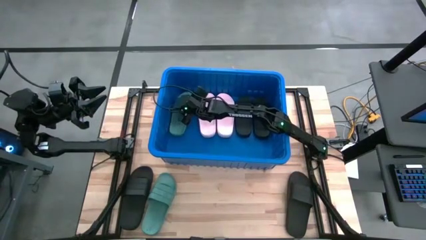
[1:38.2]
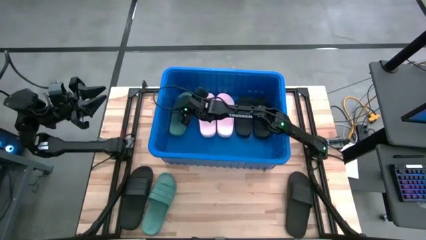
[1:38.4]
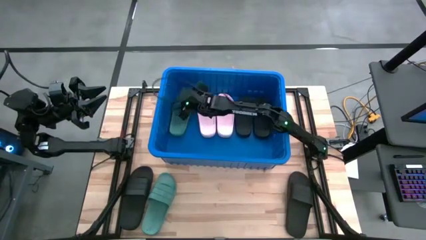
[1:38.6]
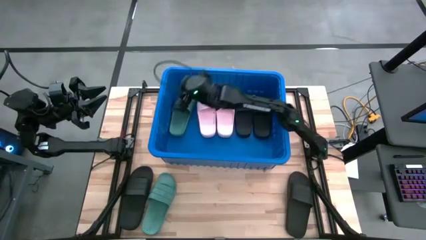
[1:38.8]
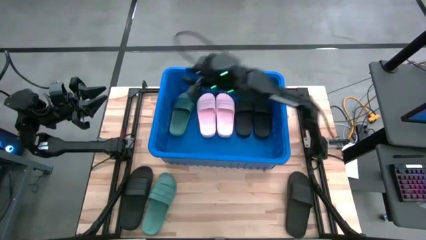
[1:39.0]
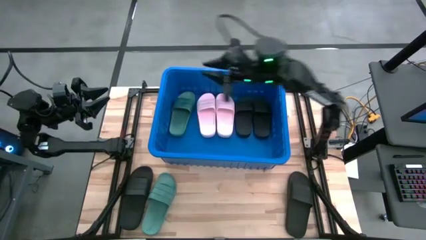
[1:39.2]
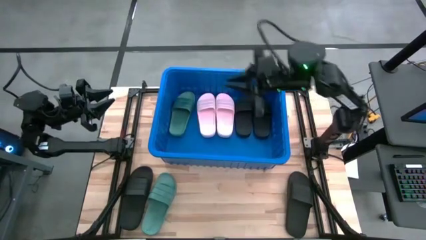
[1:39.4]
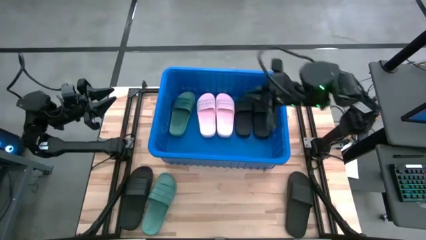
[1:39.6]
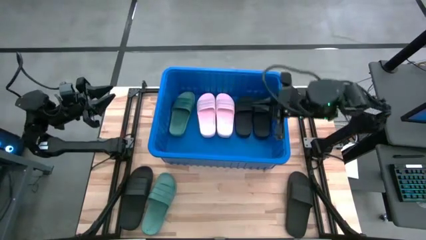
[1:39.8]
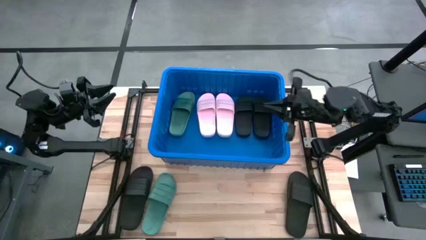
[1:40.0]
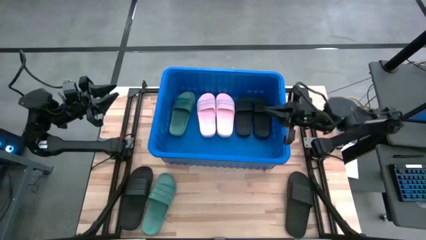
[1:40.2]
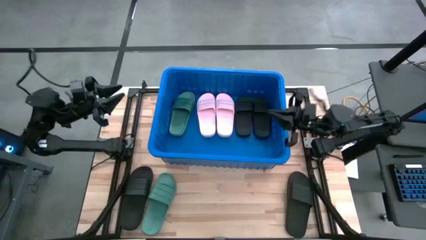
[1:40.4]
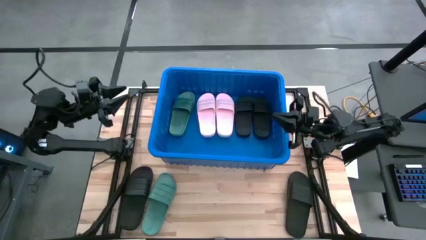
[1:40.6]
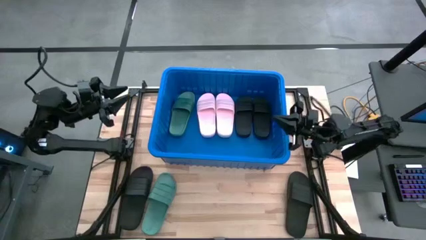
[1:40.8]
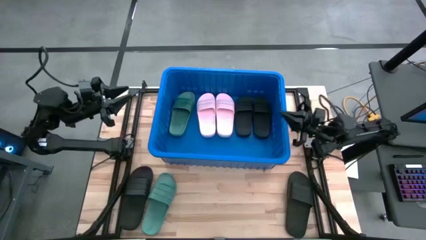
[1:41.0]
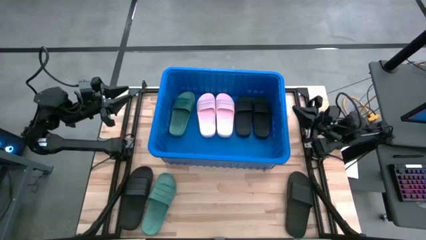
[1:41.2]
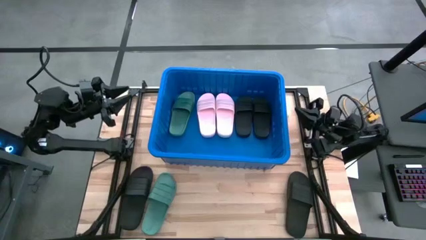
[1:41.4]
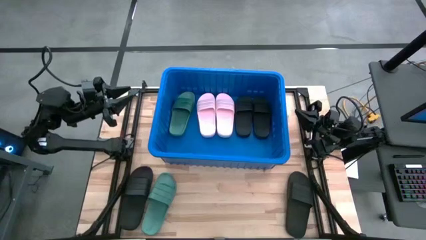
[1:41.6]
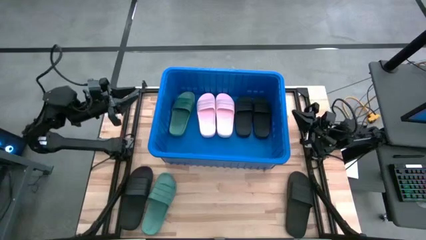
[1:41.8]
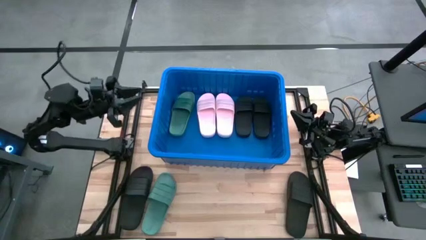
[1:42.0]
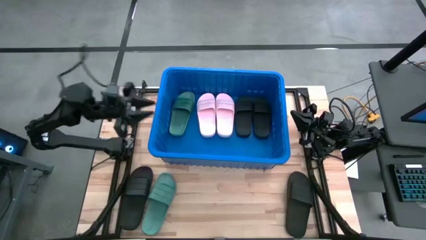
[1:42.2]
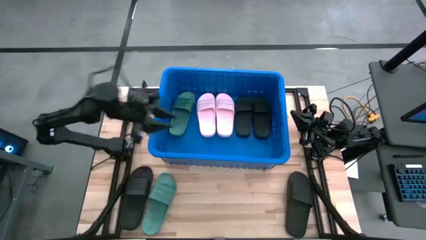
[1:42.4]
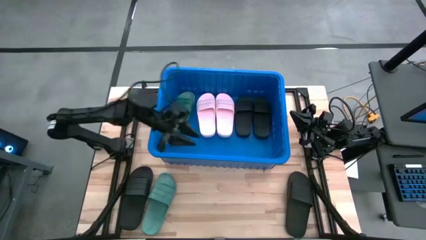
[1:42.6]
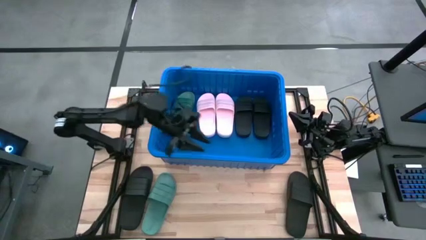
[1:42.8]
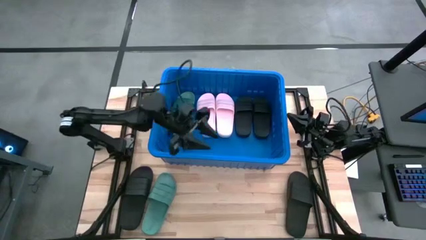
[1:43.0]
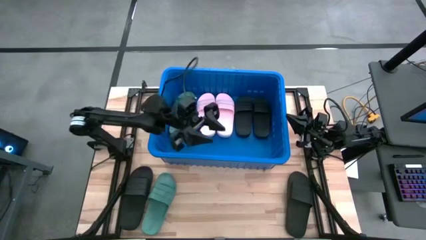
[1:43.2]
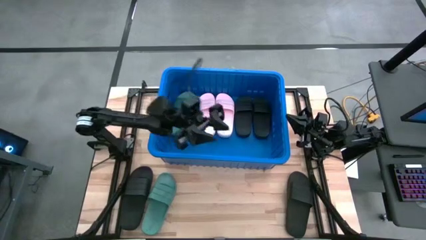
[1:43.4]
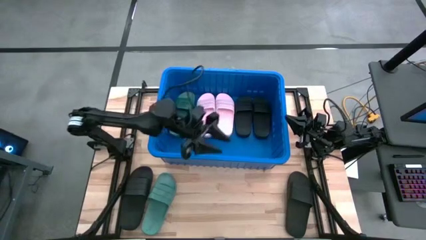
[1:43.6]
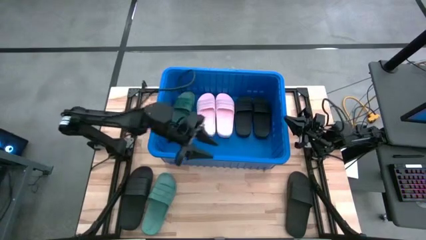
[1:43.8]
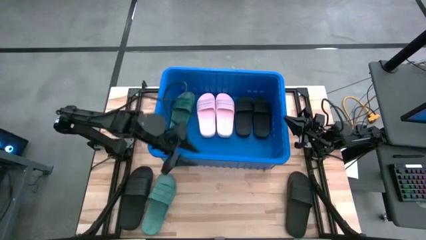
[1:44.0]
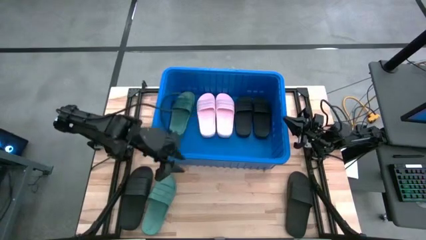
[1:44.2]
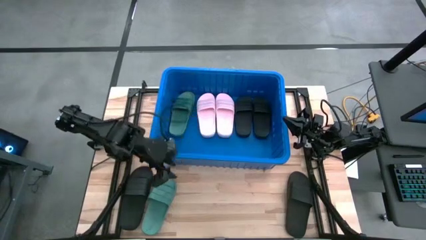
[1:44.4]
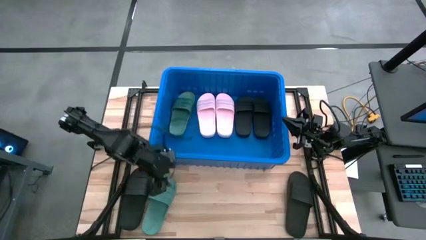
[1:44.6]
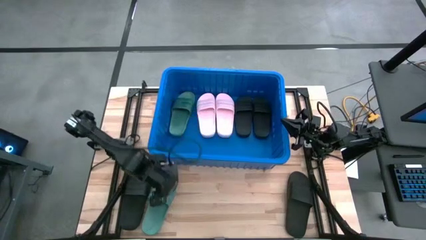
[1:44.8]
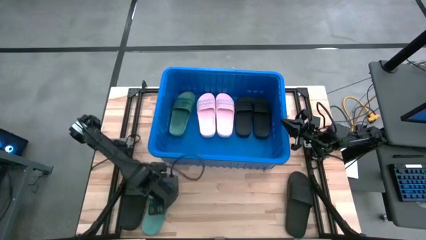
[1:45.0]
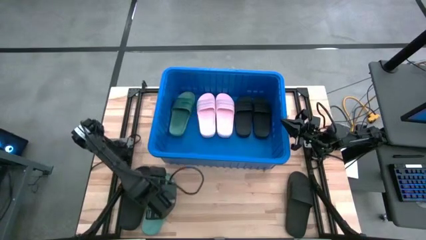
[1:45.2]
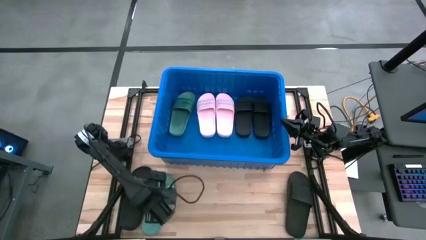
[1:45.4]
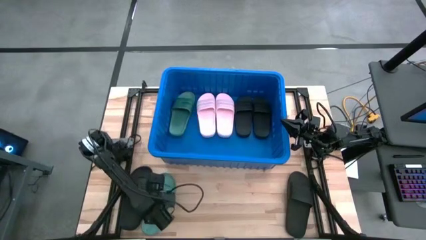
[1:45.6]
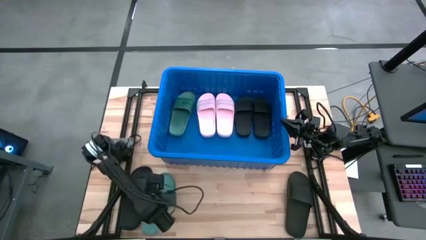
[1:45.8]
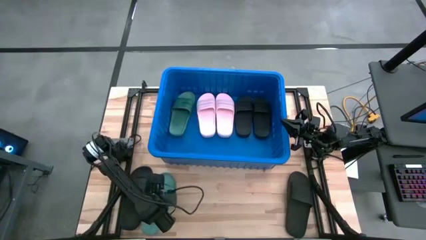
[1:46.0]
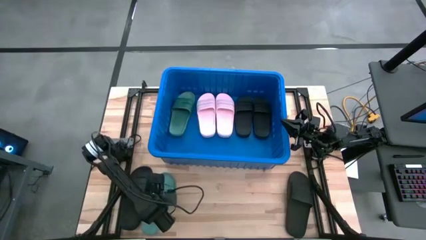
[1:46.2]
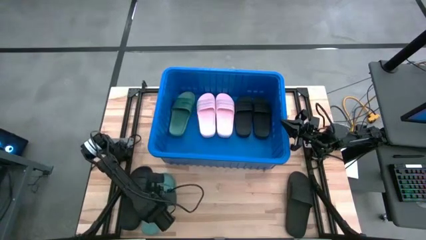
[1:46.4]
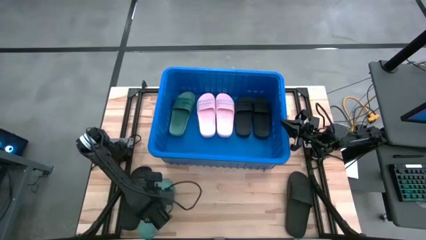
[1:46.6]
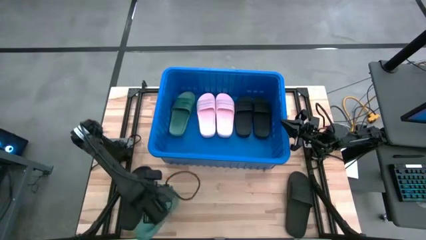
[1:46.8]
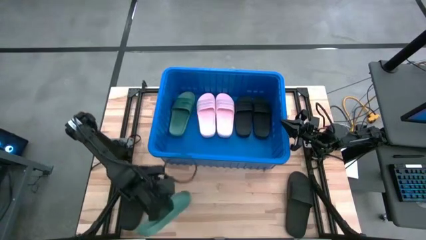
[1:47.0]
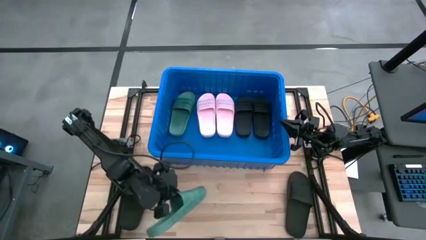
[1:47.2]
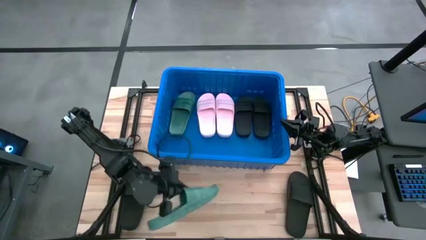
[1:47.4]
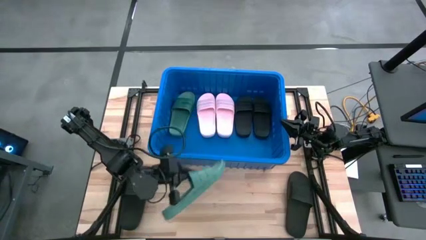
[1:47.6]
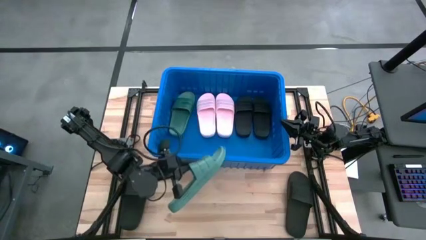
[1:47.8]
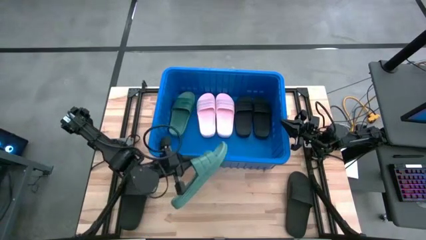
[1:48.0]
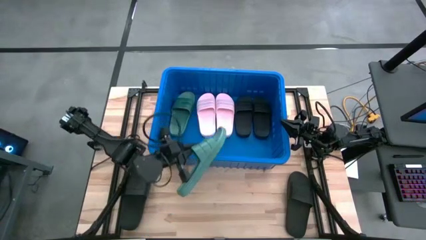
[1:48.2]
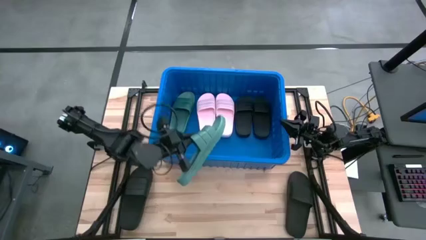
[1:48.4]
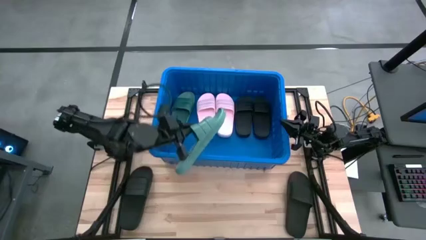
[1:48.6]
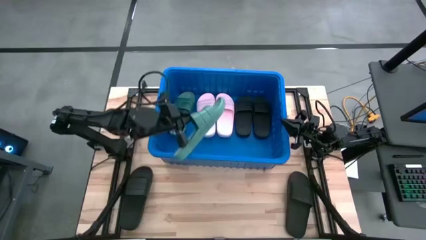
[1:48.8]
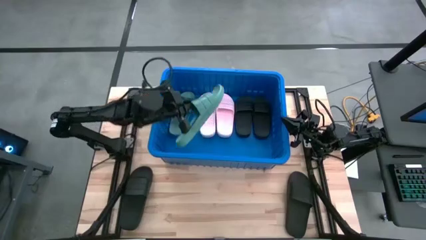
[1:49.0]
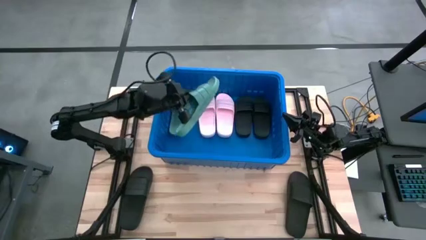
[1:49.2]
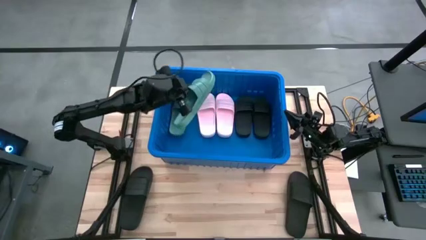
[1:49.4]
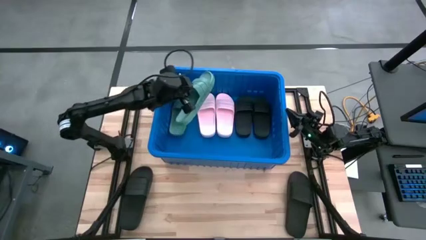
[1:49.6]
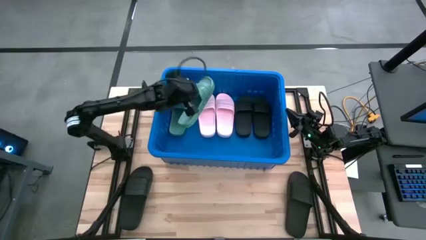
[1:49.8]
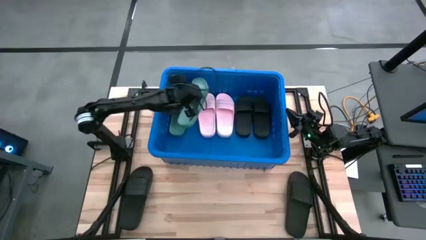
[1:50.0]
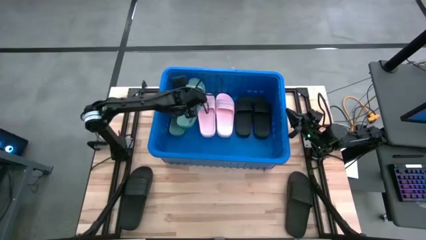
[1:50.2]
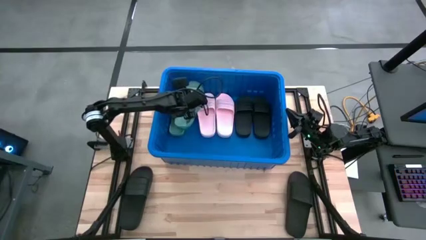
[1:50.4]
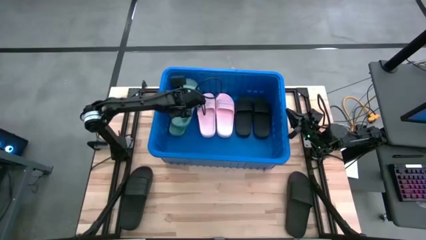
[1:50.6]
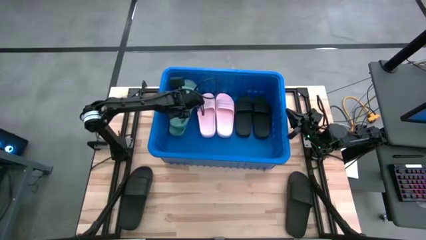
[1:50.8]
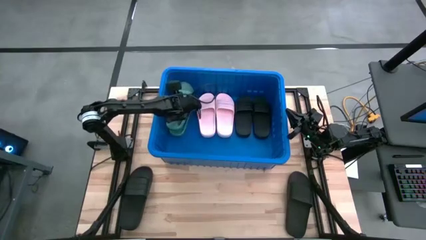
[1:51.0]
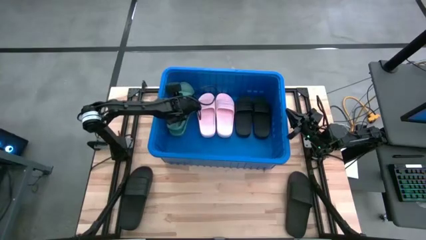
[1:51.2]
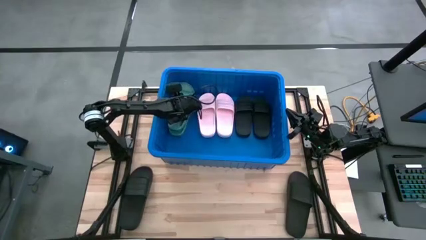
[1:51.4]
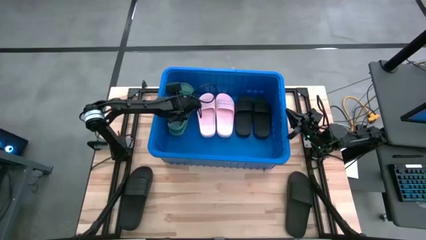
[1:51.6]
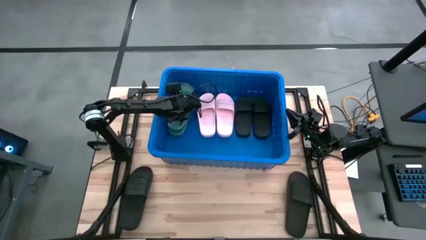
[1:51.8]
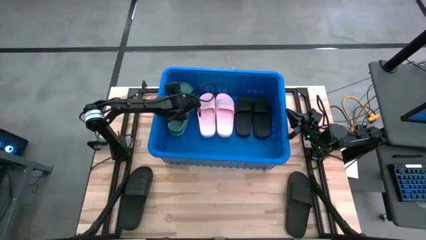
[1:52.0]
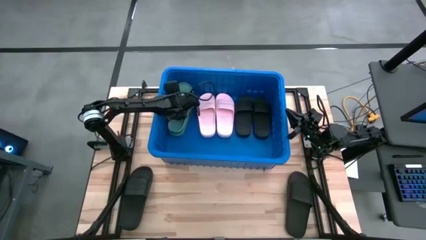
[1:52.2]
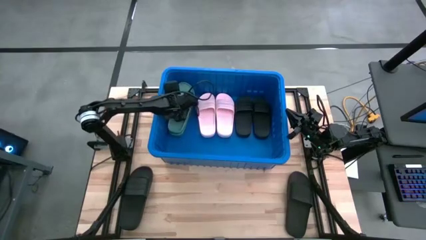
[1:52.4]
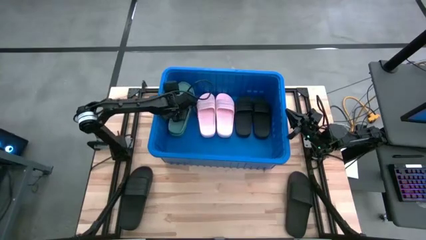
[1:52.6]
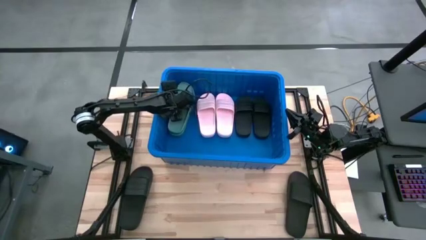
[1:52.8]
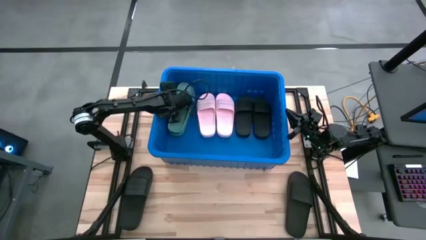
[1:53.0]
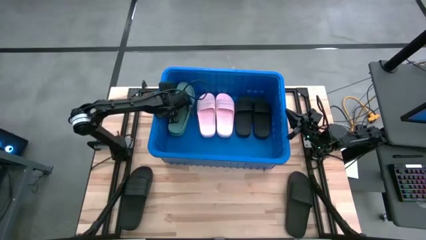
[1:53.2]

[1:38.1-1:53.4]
Task: Pick and place slides into bin
Put the green slide into the blue bin
